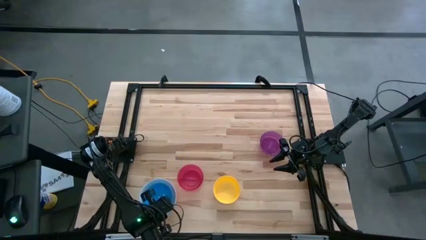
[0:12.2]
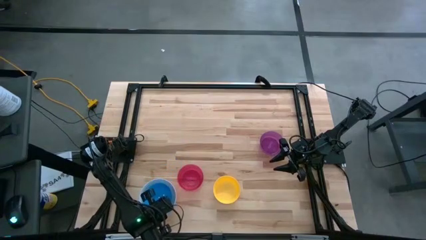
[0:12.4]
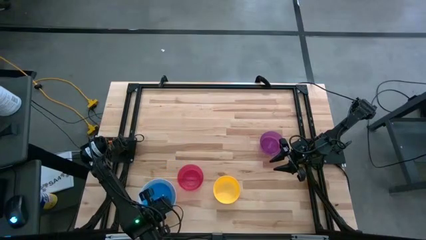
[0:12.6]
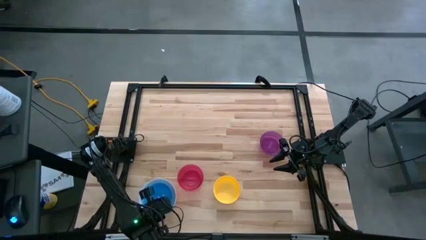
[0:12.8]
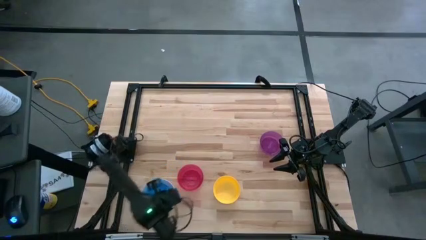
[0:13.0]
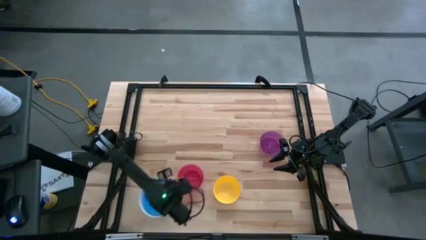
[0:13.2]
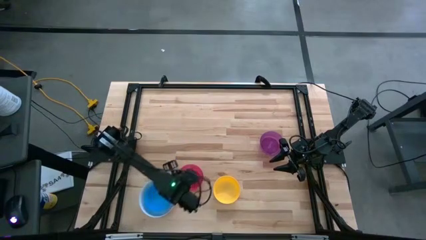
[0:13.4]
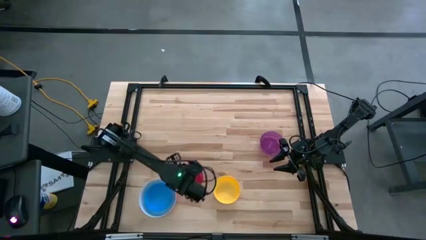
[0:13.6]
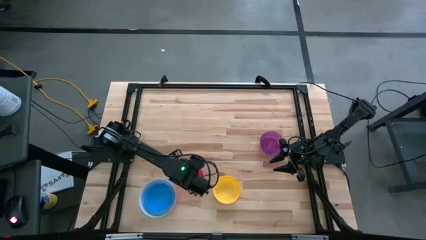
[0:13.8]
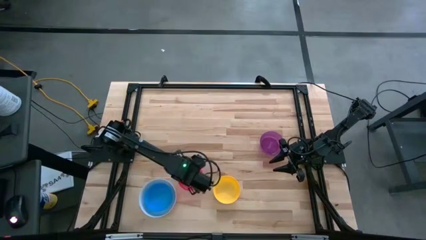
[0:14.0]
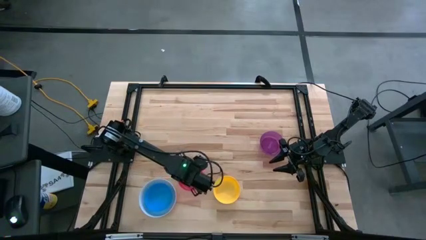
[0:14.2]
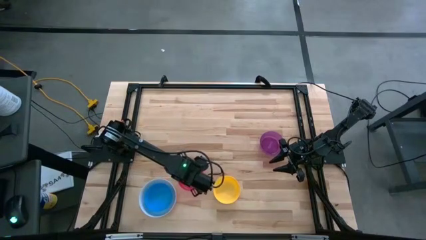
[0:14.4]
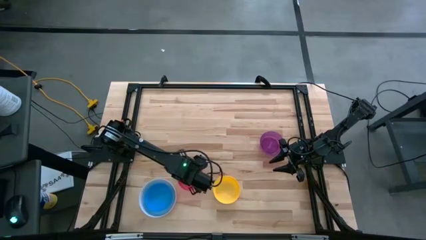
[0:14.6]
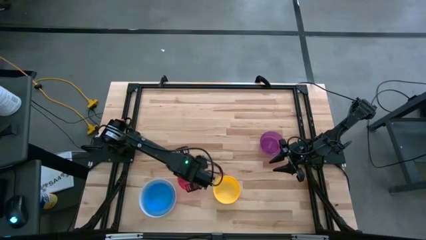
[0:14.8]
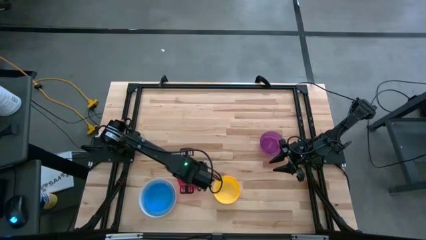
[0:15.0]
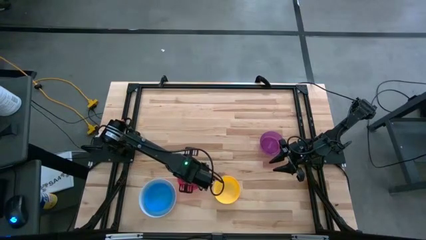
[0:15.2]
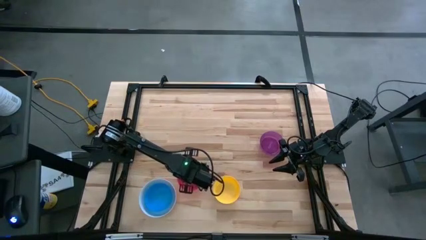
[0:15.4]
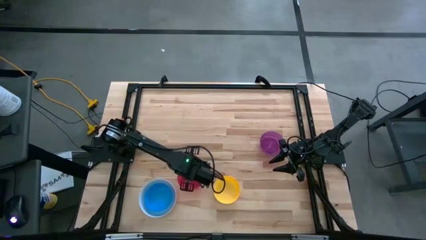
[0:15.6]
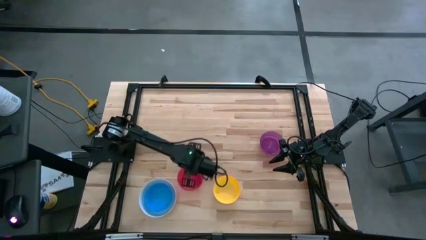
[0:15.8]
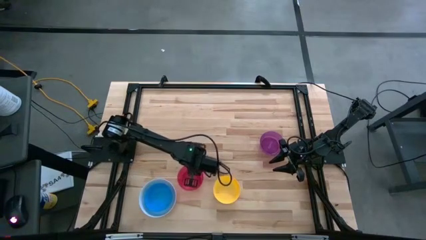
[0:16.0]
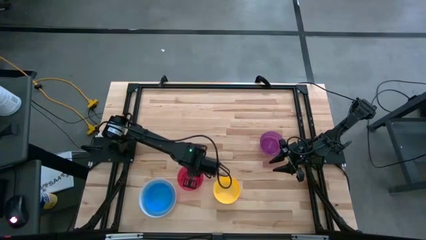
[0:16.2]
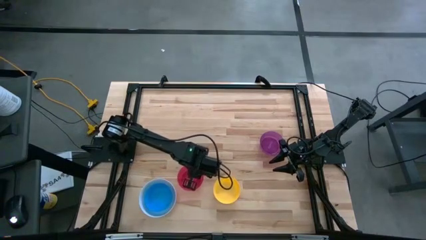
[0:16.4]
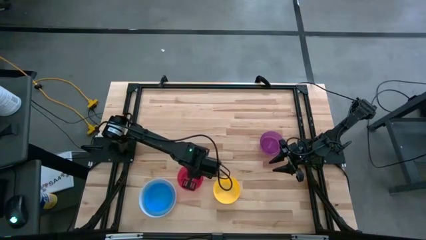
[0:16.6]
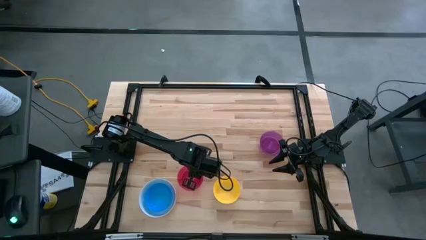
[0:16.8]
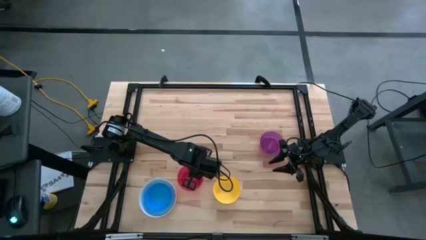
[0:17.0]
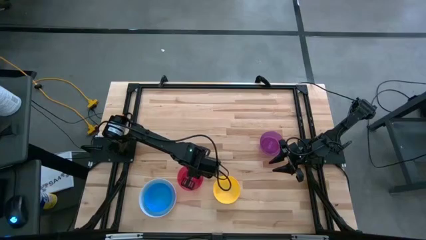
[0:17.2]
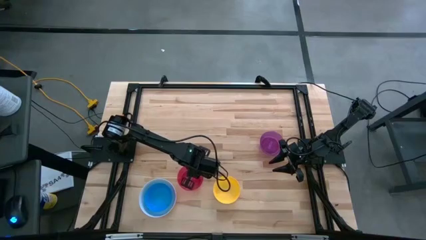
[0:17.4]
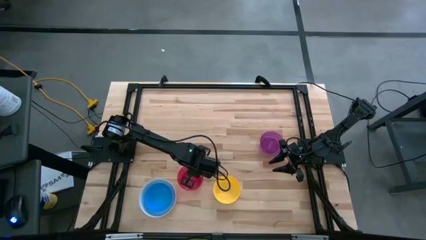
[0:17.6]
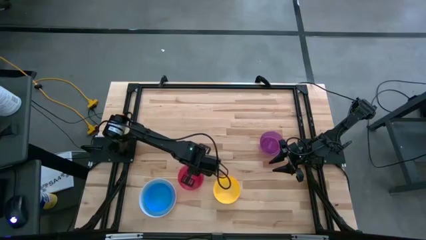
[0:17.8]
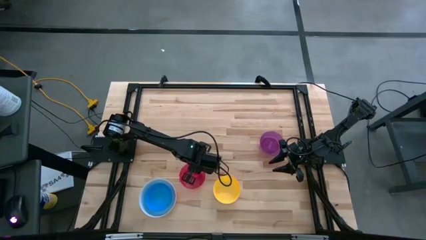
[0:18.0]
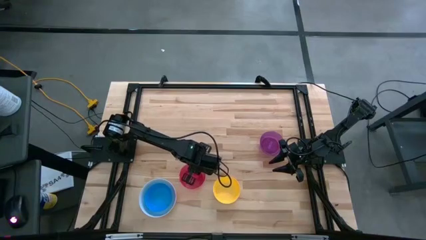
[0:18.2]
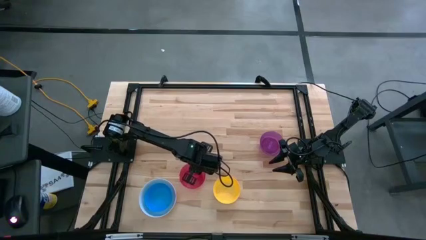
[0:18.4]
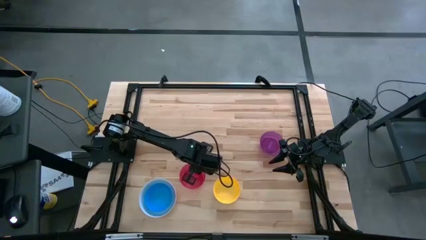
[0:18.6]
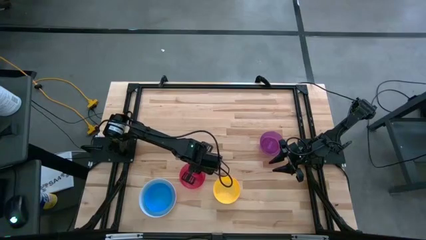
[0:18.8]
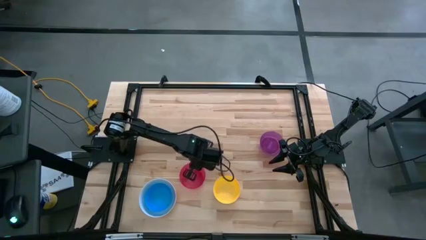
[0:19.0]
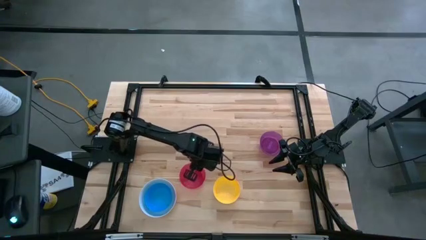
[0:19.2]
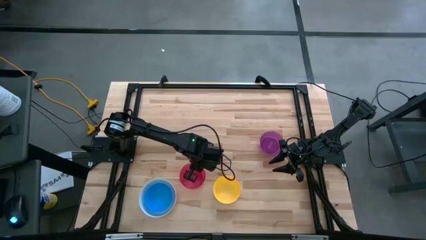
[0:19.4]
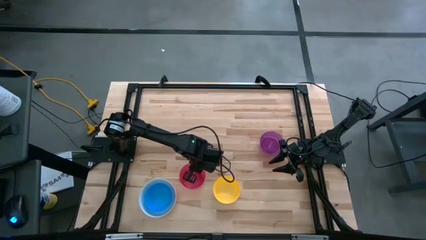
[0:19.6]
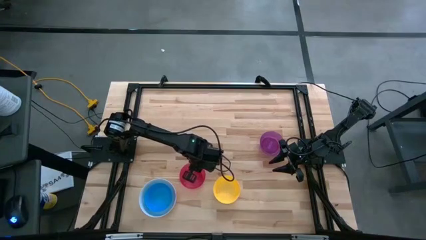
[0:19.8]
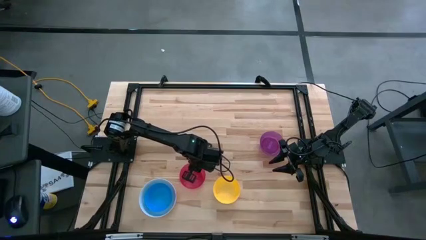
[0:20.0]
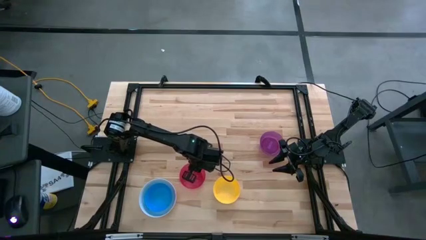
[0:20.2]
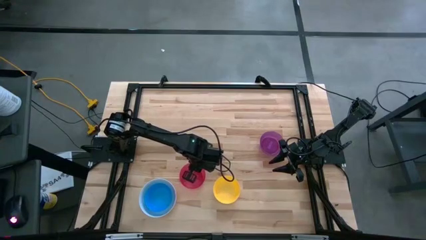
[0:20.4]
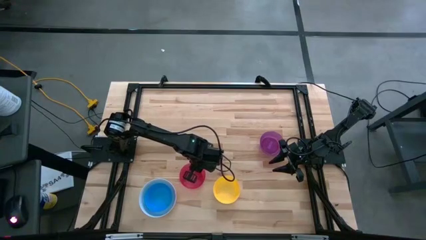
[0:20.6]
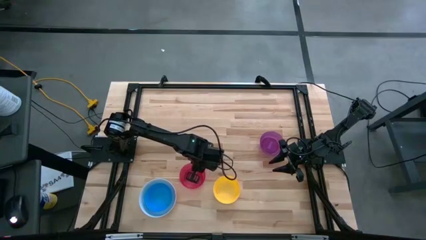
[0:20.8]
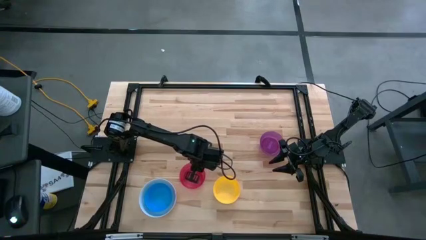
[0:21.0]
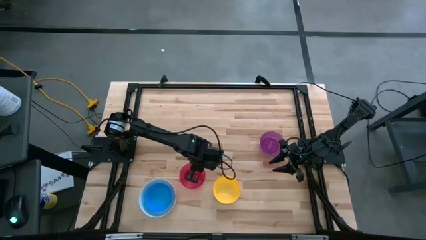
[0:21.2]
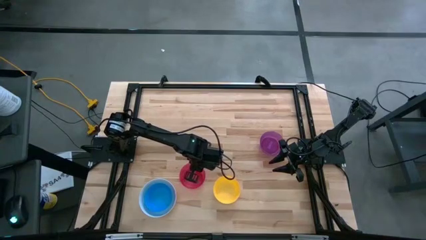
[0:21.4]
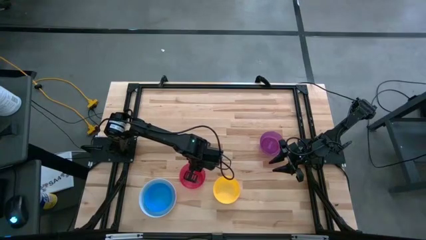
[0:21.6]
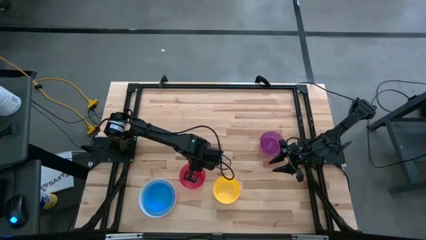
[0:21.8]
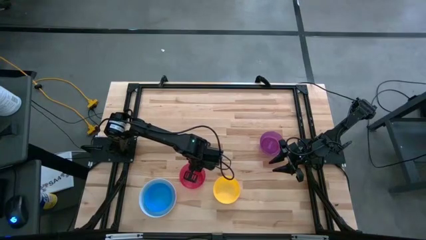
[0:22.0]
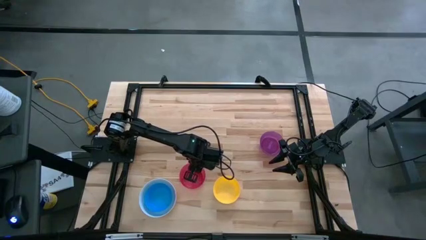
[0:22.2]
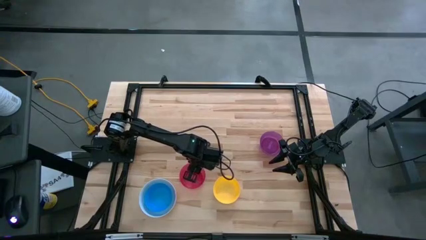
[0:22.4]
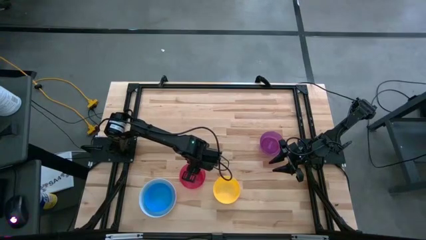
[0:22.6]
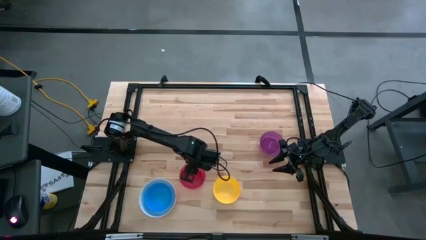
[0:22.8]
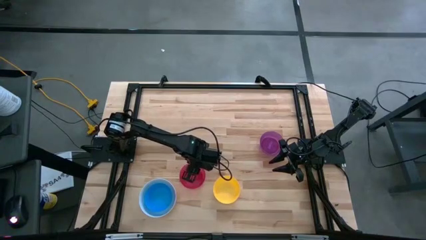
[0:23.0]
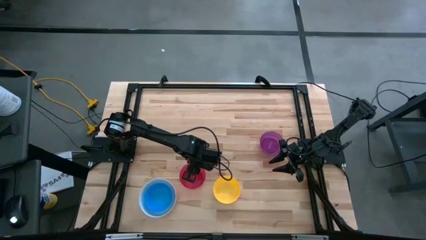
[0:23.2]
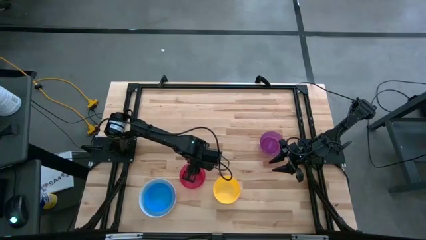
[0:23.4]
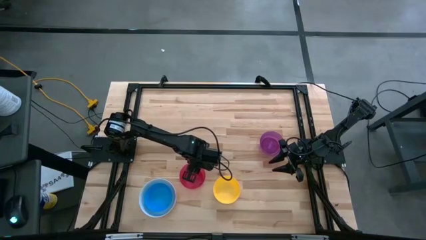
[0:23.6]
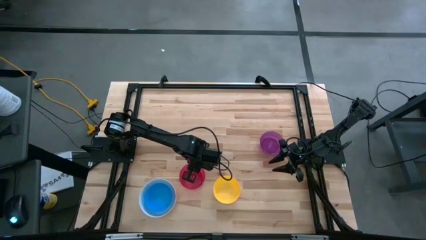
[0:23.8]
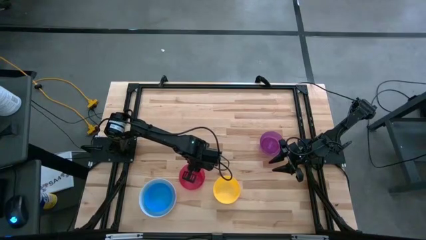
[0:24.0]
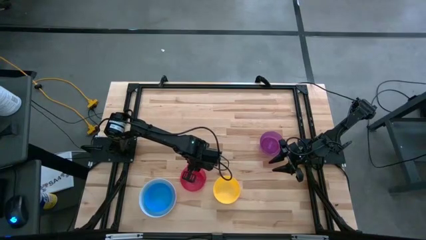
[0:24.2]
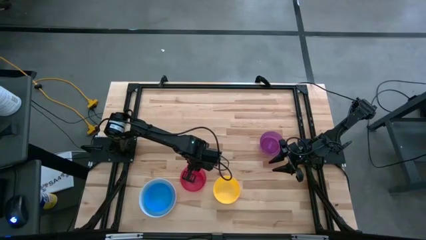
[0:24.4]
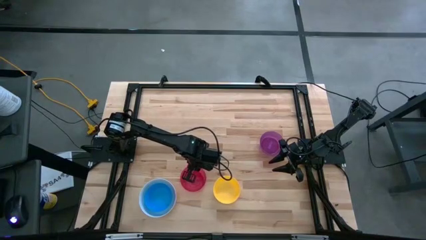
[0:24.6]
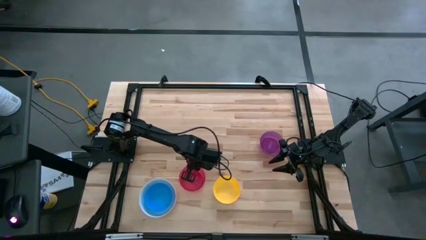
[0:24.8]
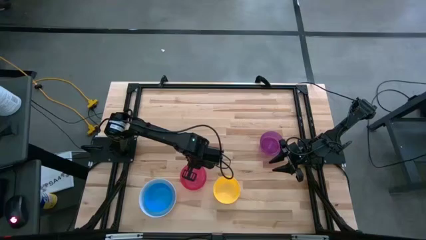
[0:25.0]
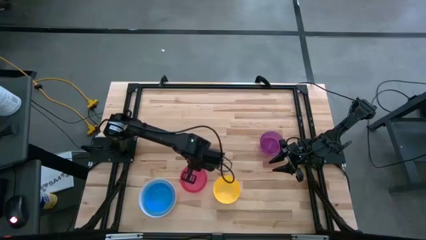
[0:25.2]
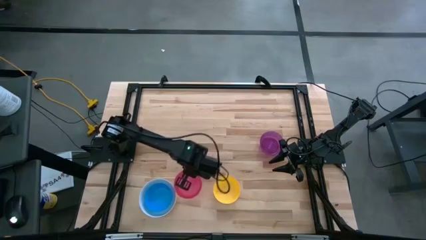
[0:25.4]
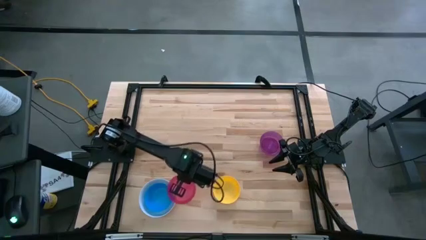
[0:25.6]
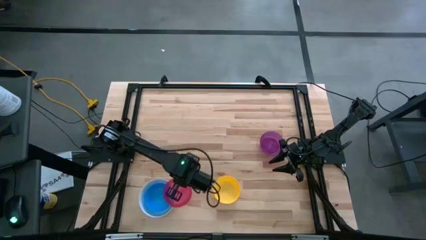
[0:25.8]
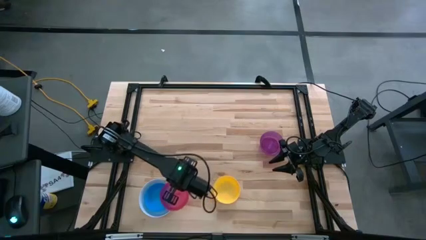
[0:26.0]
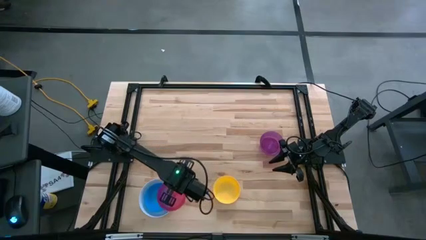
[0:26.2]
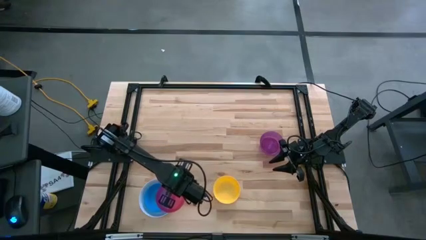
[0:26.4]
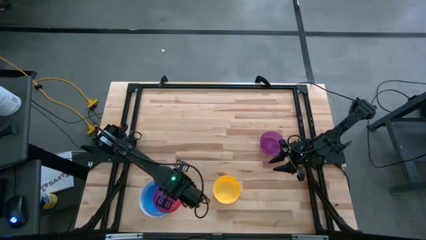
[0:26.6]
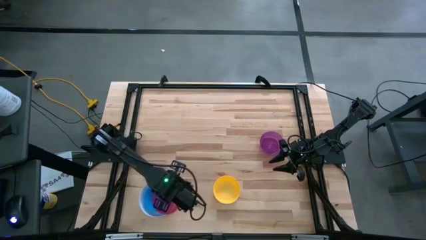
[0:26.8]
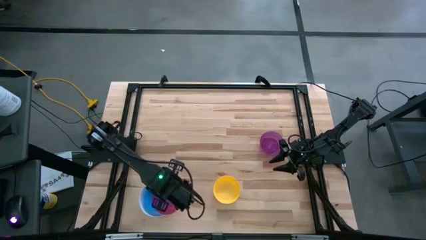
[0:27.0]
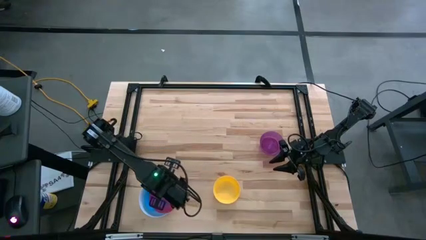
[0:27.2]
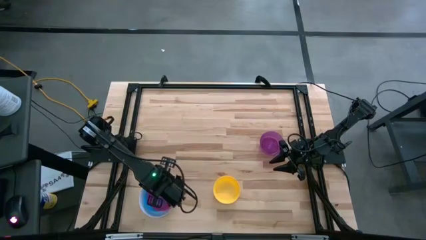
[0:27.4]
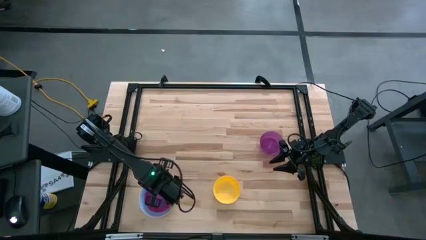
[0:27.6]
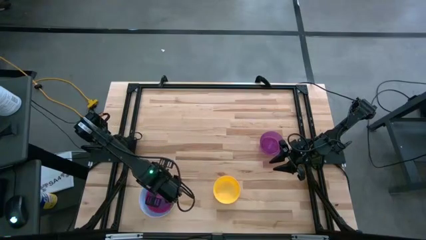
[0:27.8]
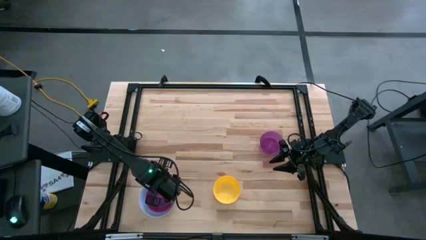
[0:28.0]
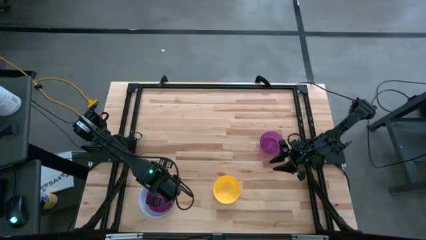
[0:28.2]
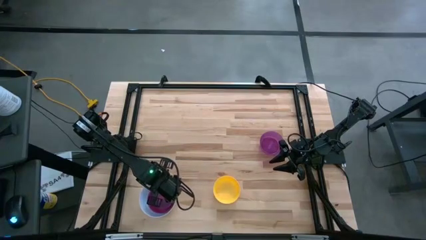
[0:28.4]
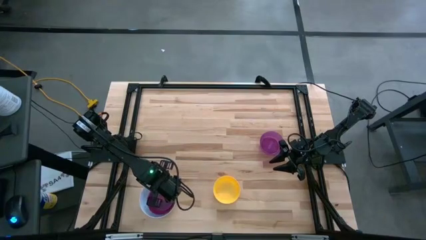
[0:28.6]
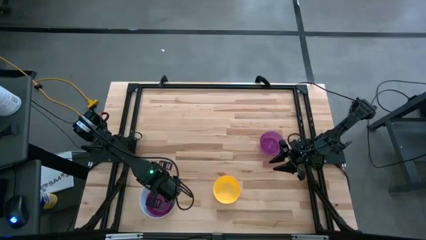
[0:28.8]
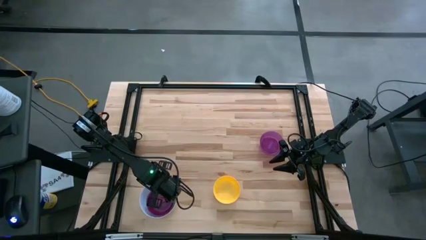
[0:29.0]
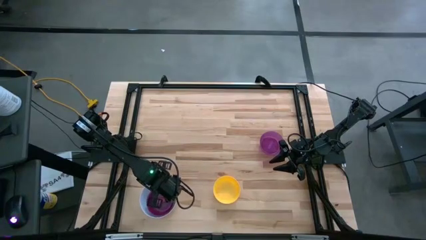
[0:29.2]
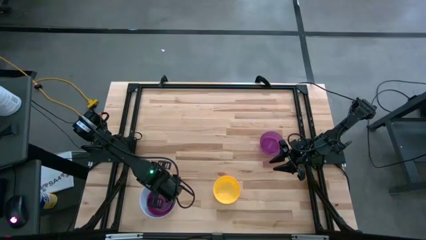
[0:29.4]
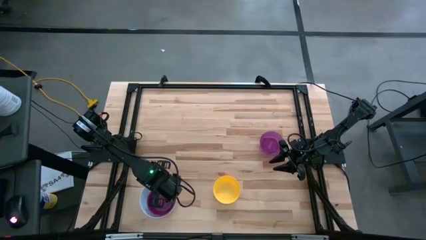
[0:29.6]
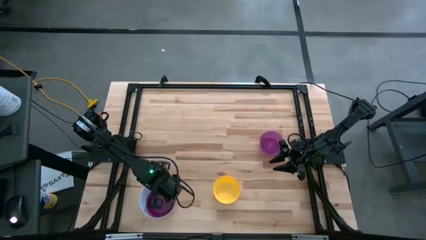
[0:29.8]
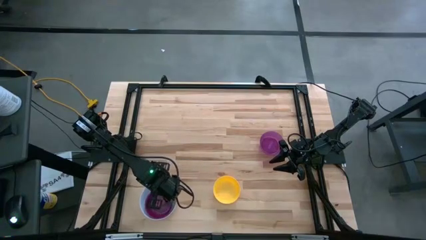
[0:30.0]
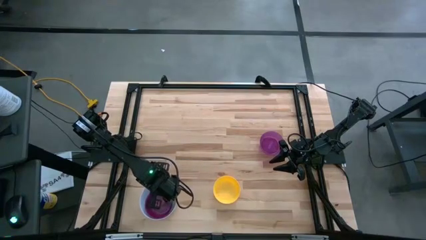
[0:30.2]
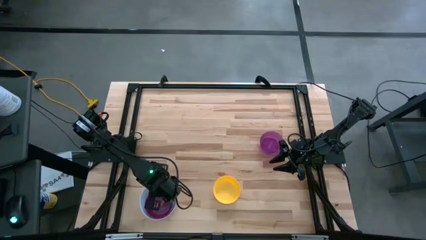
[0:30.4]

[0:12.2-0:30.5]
Stack the pink bowl on the blue bowl
